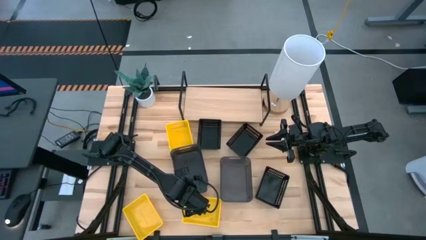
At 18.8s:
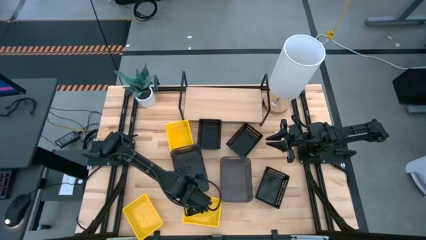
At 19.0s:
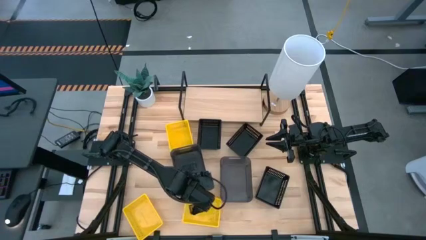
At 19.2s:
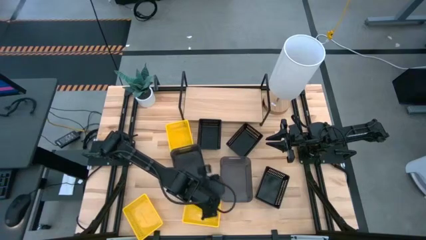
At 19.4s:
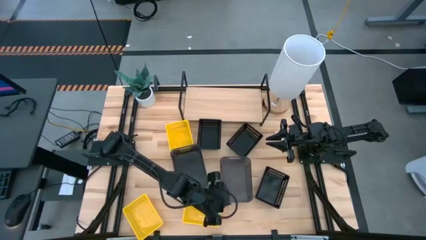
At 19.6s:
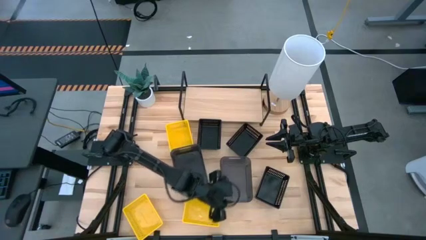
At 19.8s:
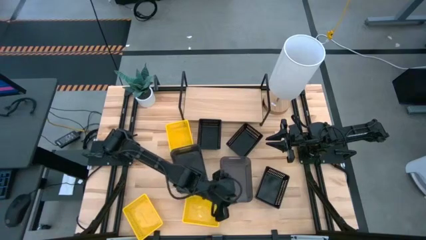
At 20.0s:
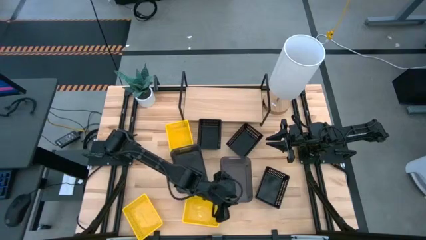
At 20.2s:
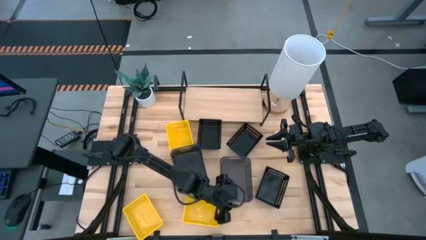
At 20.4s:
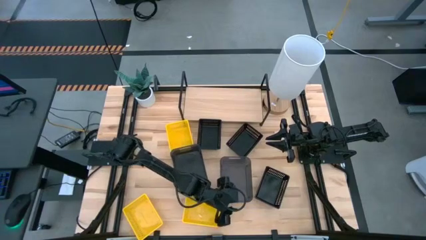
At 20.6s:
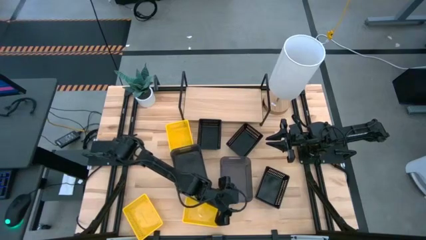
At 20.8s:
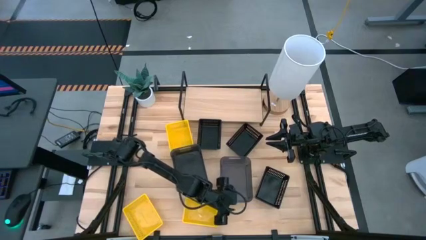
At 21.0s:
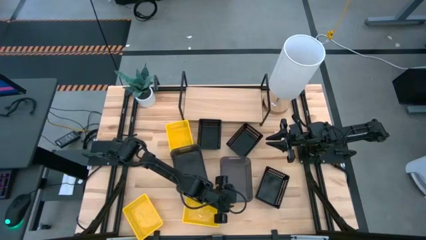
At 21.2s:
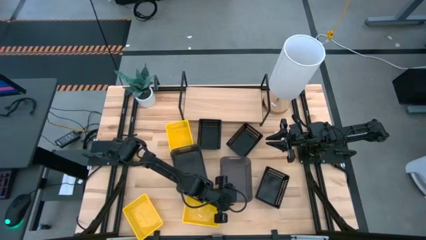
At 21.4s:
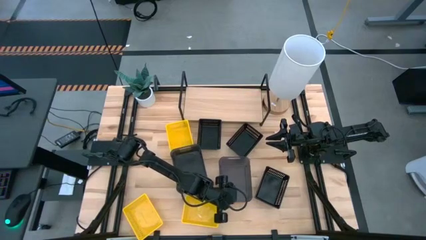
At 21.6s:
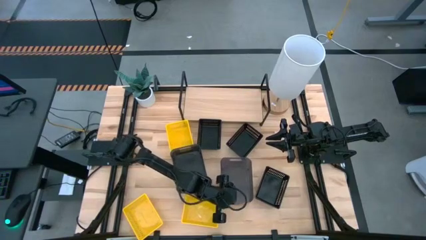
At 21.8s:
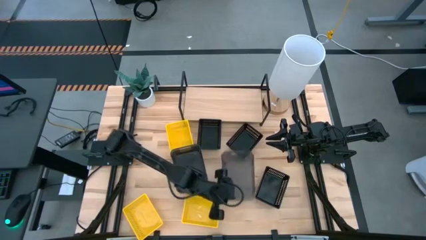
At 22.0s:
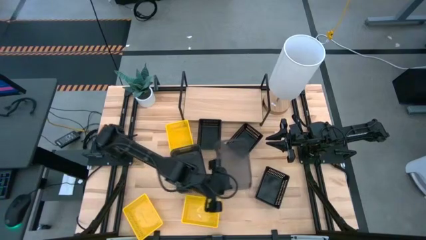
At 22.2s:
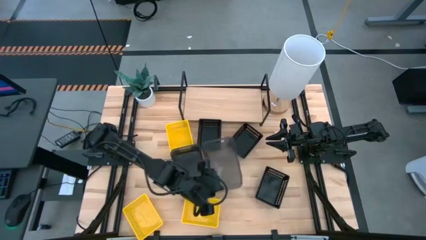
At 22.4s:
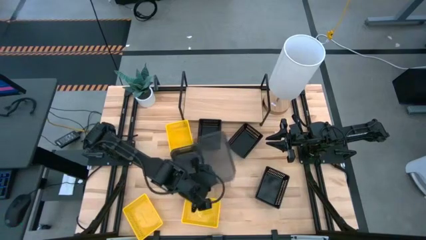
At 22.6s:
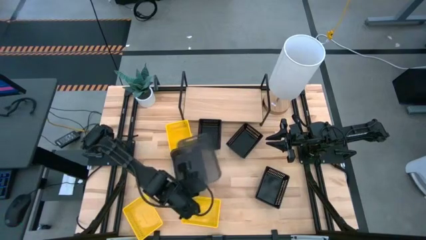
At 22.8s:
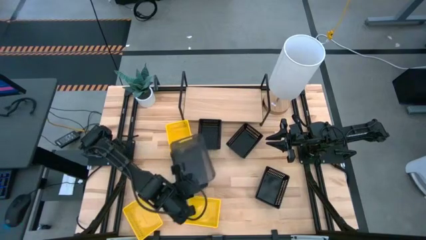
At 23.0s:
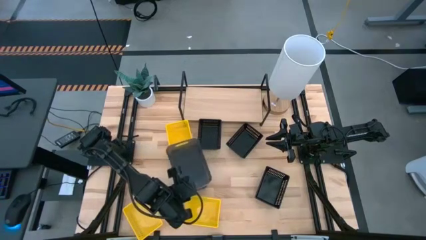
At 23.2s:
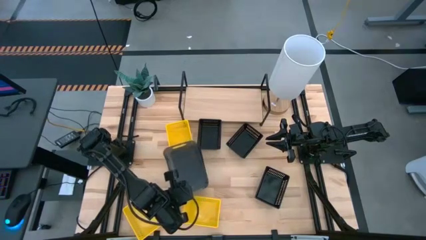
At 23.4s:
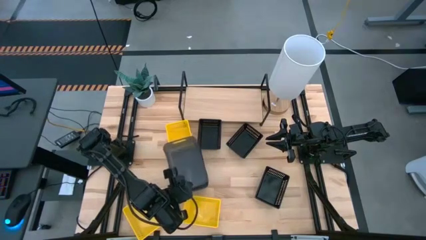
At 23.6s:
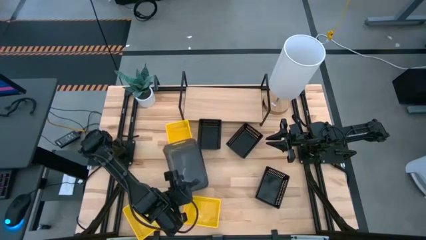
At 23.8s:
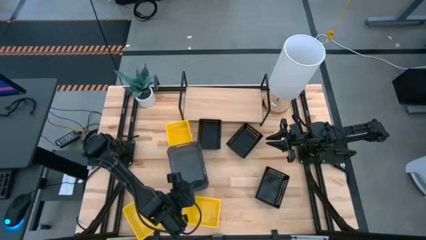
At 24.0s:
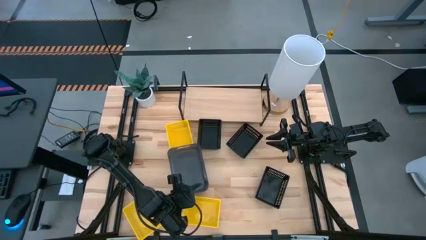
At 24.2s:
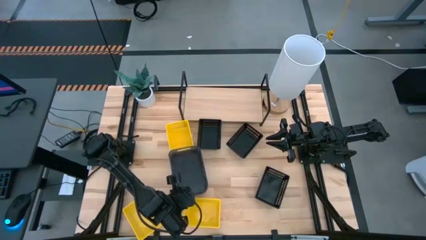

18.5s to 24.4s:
Task: Stack baskets on shelf by color
Stack the right gray bin on the stacked gray bins

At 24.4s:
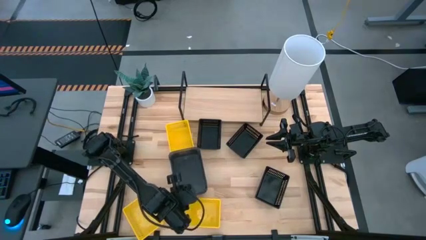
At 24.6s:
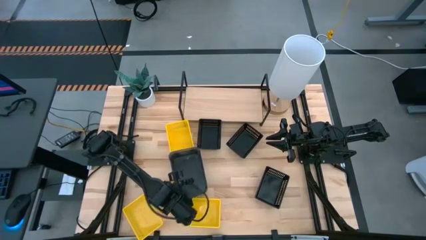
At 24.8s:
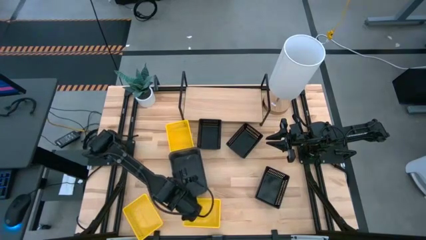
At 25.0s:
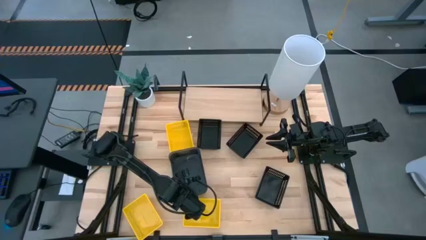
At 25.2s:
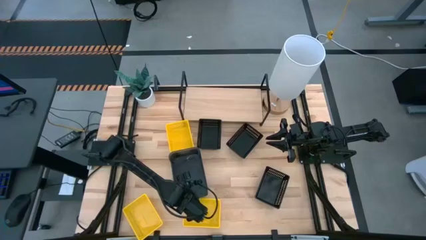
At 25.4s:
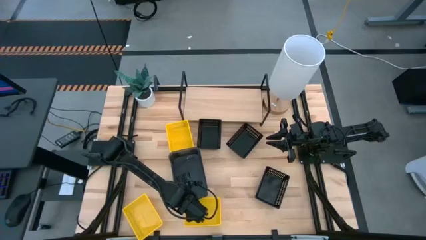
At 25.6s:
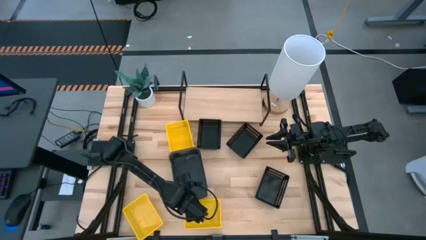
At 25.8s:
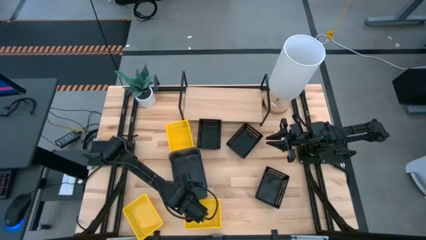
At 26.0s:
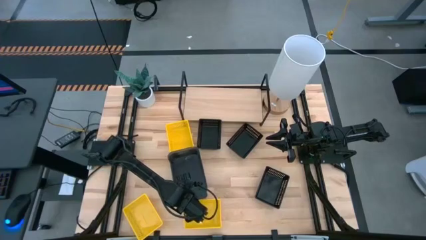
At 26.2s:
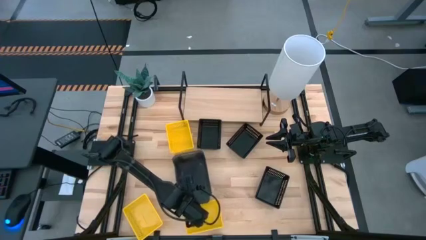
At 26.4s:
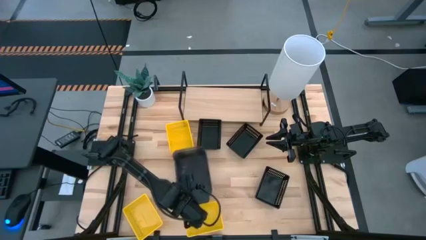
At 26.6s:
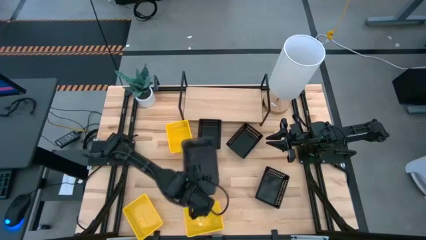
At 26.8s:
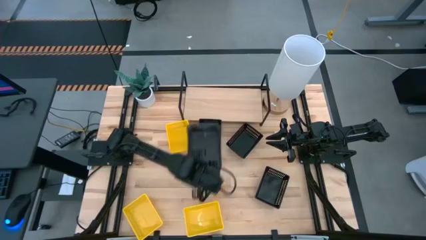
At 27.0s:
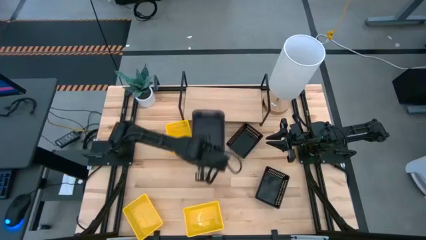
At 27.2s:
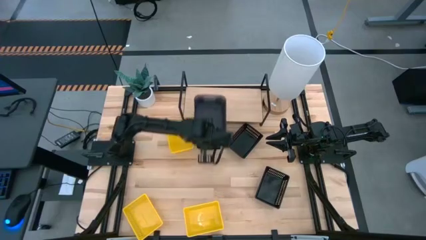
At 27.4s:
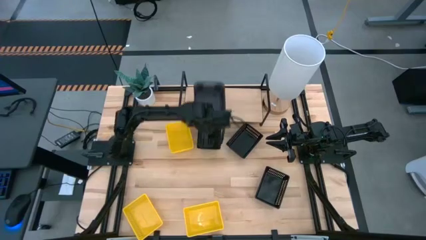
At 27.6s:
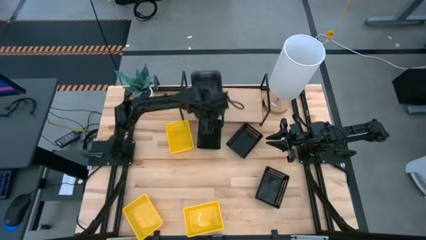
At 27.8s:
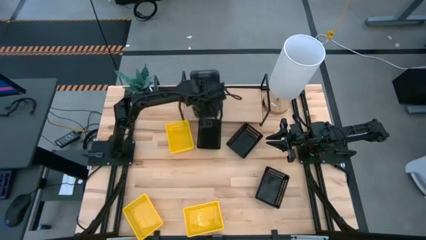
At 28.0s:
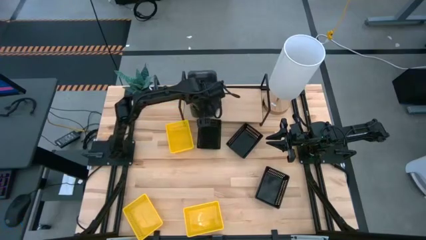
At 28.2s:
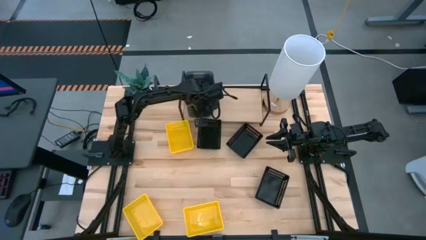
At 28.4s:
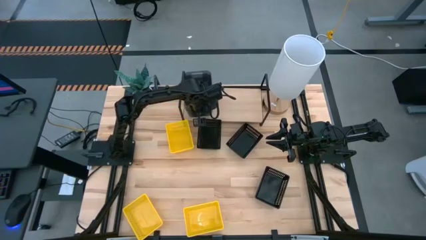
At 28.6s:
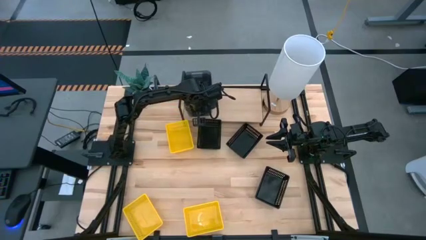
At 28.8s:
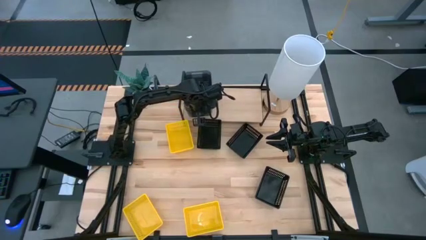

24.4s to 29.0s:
Put the stacked gray bins on the shelf

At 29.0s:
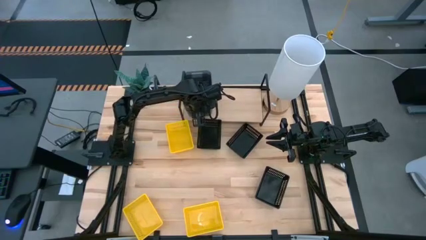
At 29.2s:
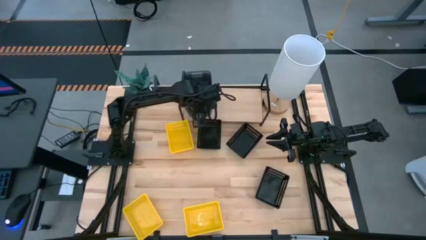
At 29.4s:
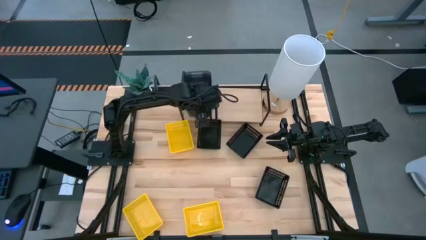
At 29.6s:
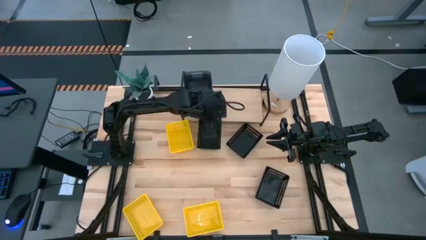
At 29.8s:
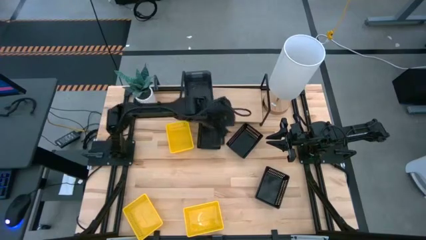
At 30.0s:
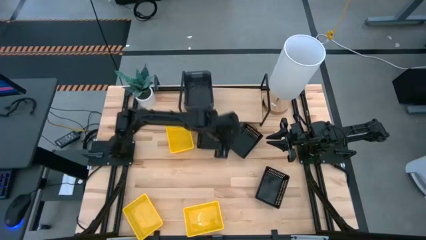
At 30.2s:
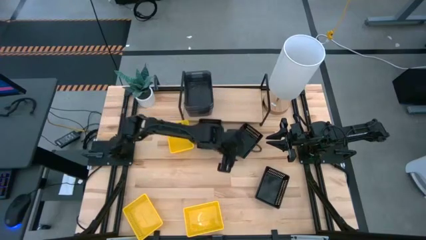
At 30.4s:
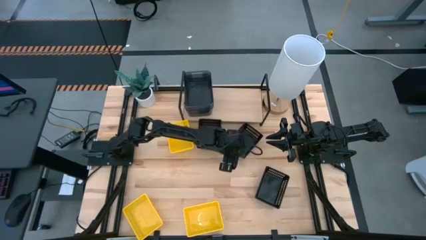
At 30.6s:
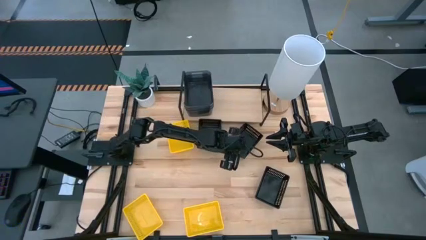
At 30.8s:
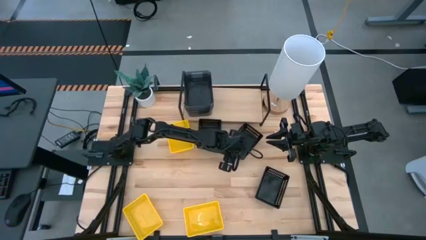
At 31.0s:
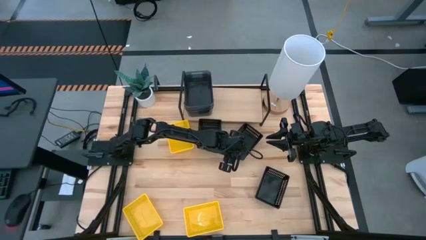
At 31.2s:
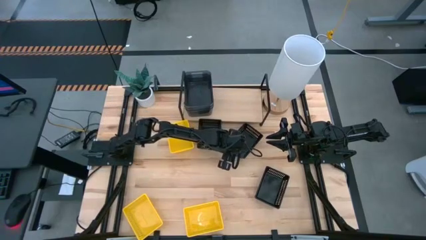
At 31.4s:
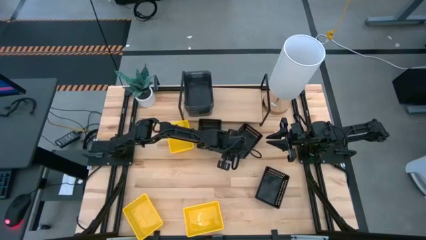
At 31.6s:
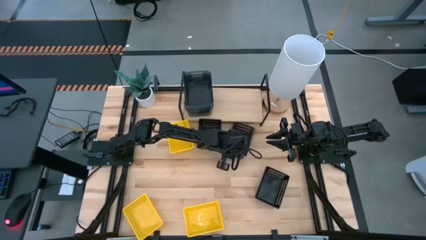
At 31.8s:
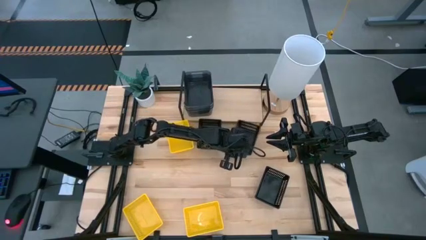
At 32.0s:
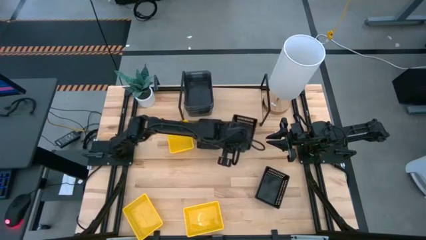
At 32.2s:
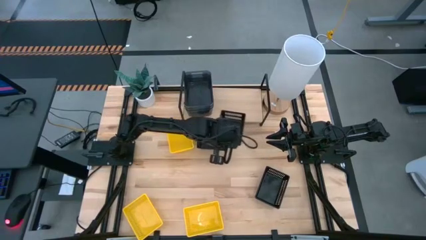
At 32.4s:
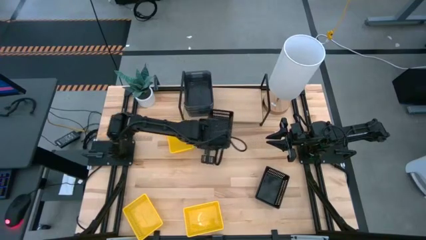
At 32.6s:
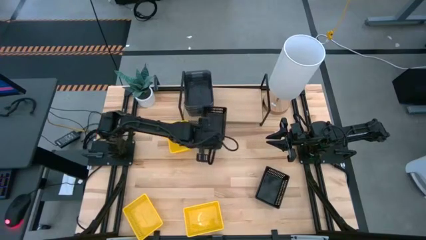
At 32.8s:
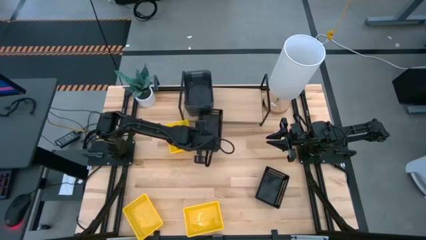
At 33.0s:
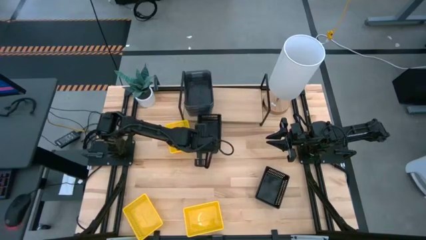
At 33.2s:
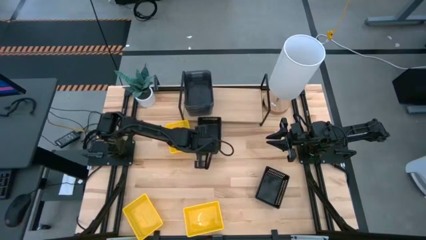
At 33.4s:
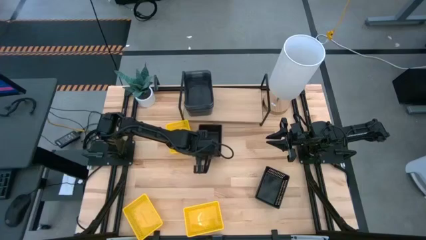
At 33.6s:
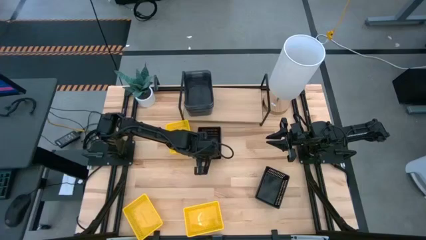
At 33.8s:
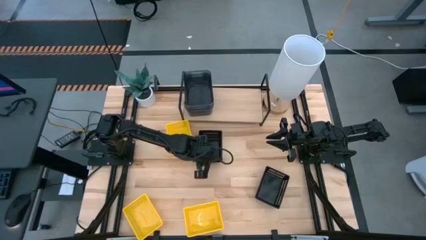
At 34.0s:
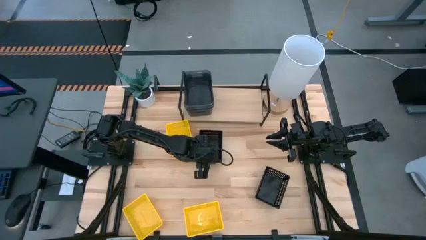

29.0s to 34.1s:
Stack the top right black bin on the top left black bin
